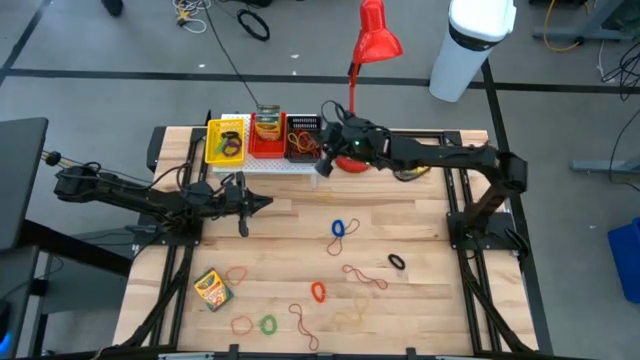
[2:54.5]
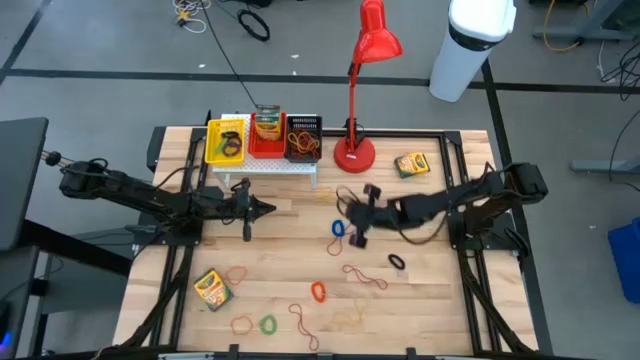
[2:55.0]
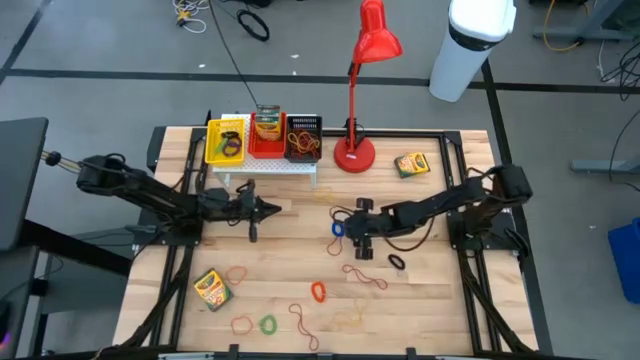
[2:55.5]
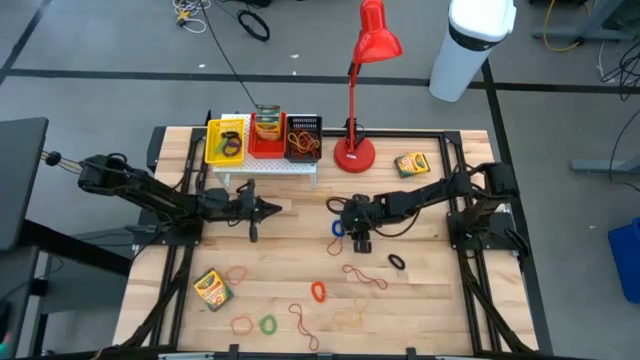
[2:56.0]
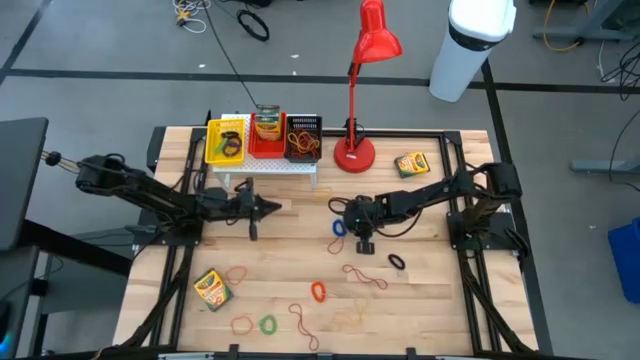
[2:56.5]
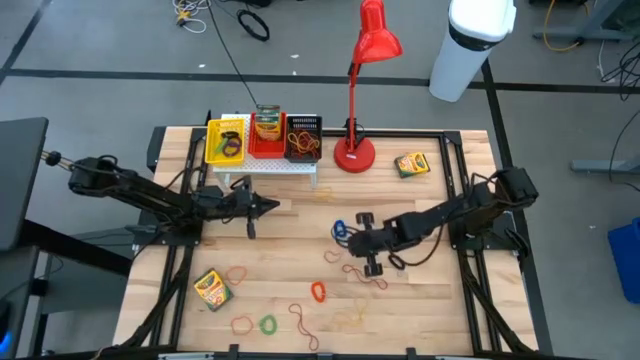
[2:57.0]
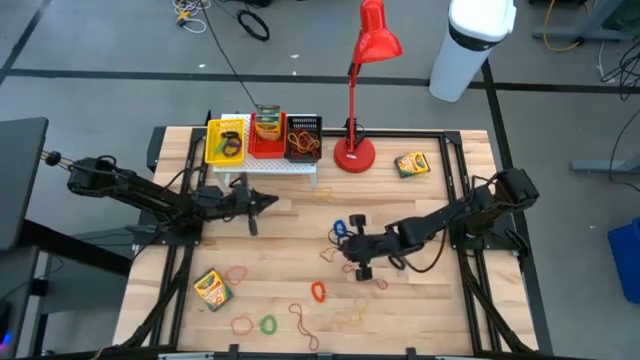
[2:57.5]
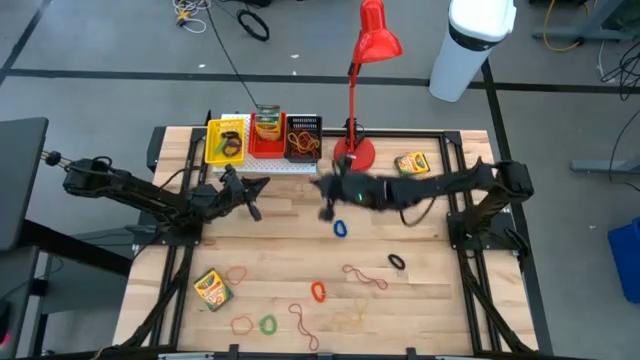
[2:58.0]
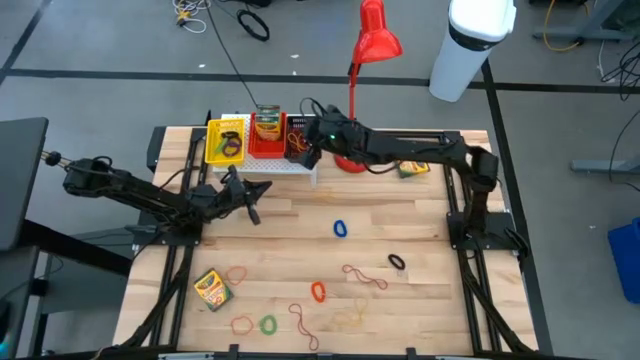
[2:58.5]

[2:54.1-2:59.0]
Task: Pick & Place Office Desk Supplies
Put the red rubber band into the black bin on the shelf

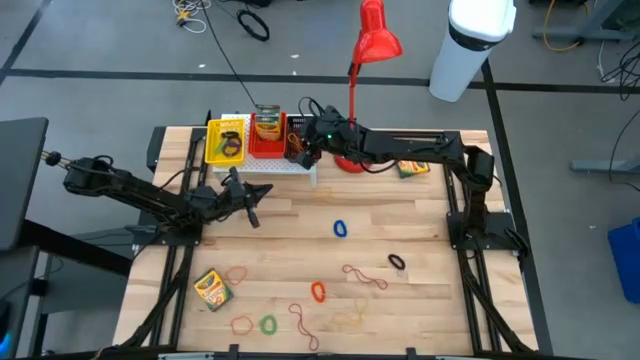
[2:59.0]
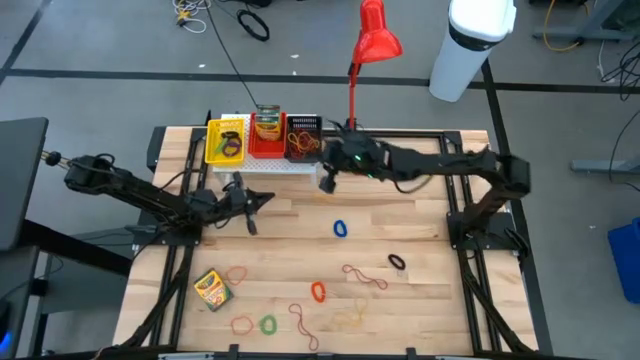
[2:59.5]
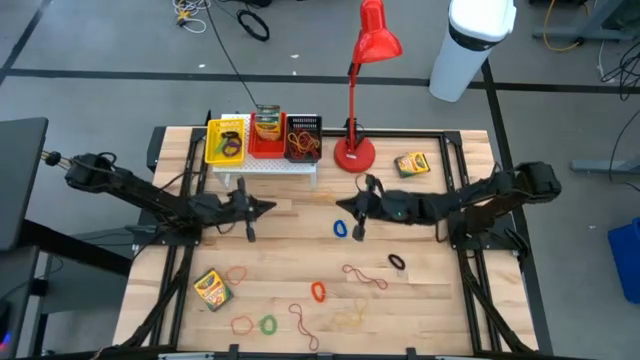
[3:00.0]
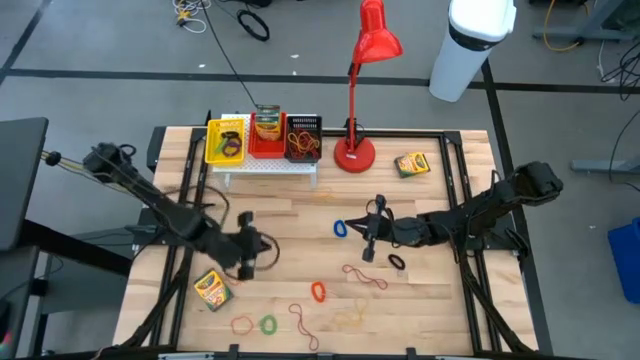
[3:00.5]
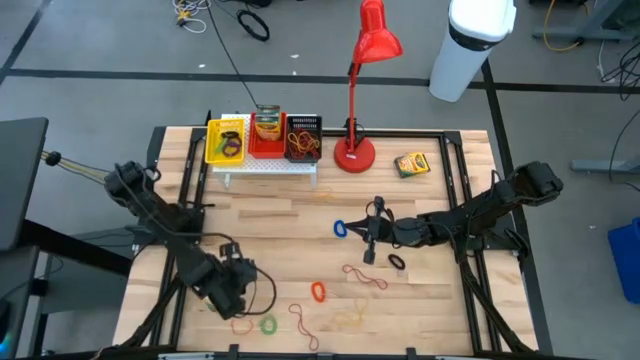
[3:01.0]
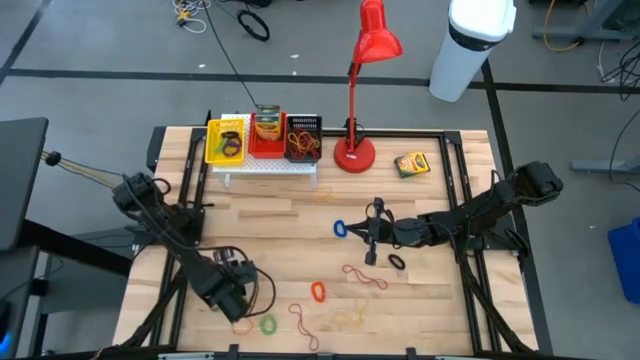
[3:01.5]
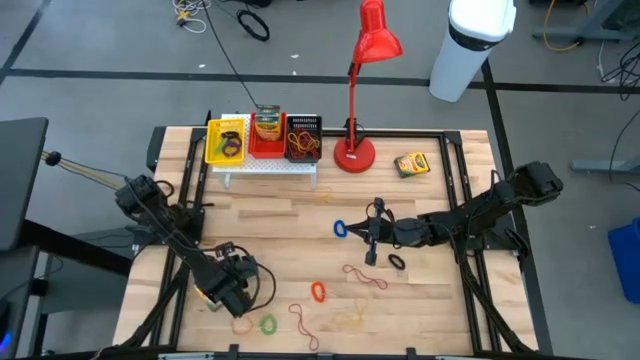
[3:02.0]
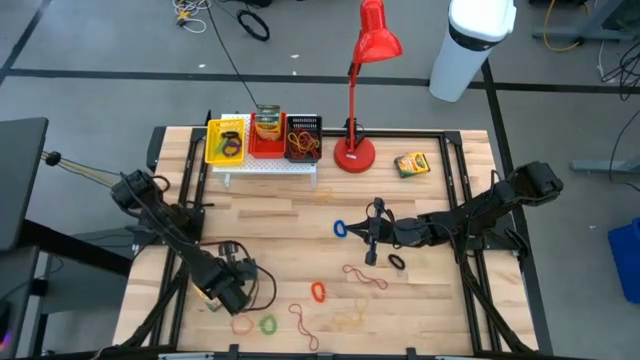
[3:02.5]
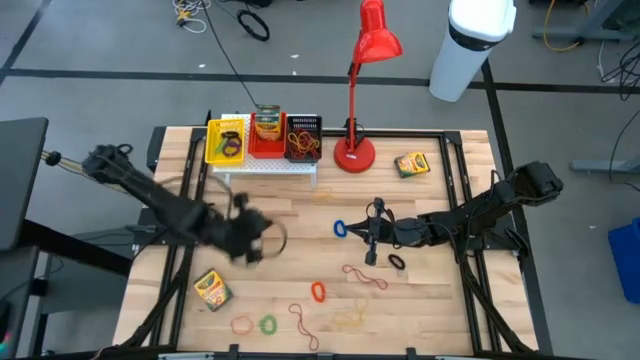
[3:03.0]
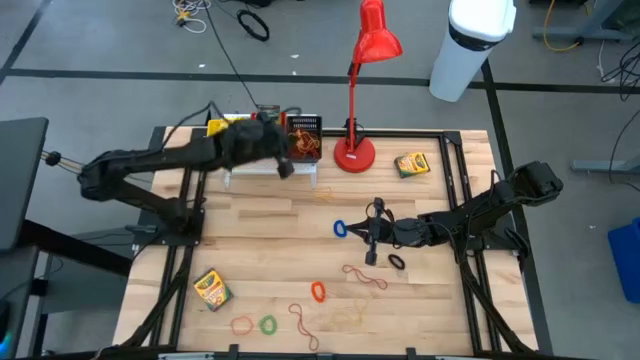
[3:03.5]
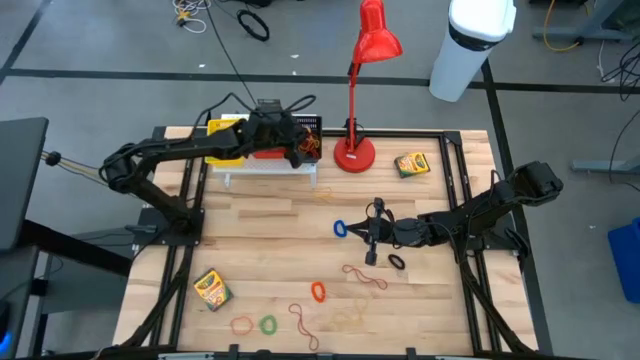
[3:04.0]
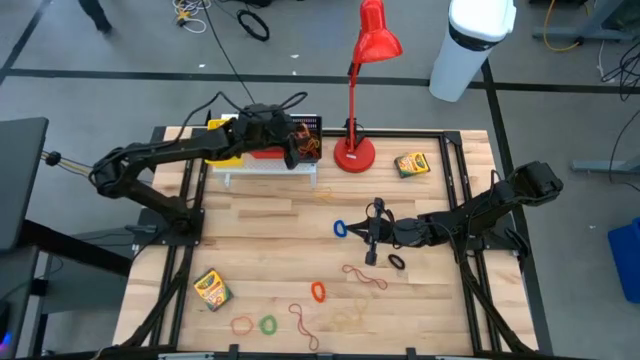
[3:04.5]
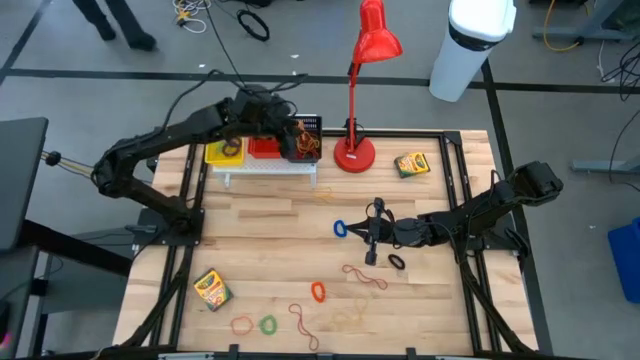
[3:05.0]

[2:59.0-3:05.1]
Put the orange rubber band into the black bin on the shelf

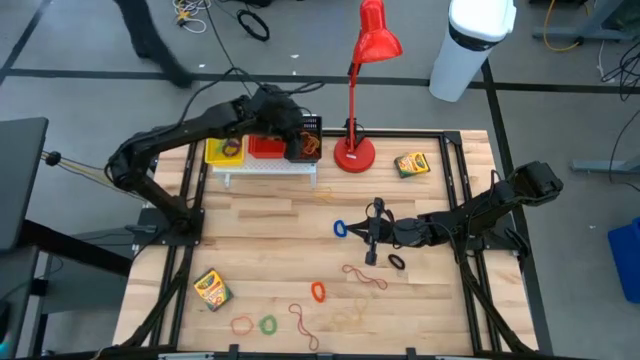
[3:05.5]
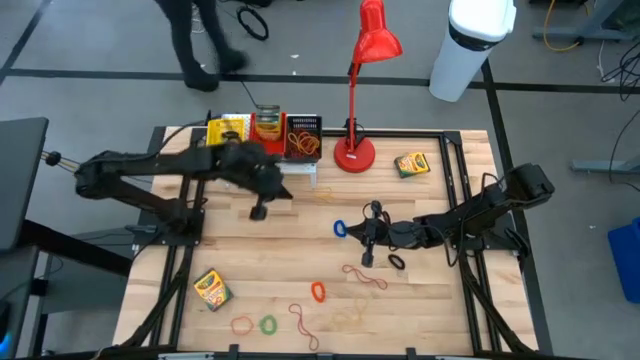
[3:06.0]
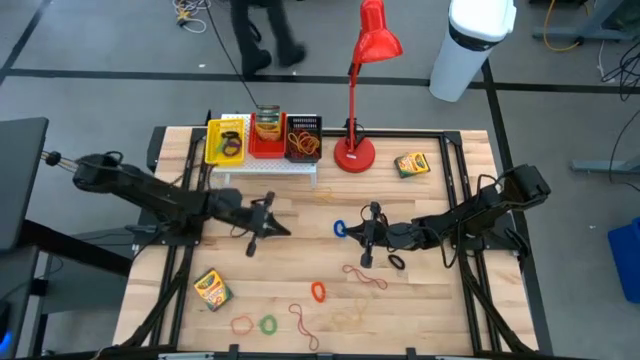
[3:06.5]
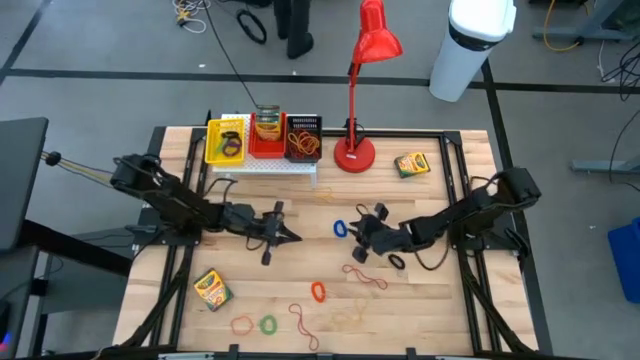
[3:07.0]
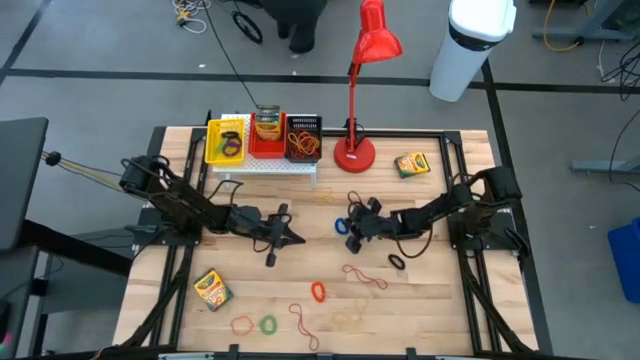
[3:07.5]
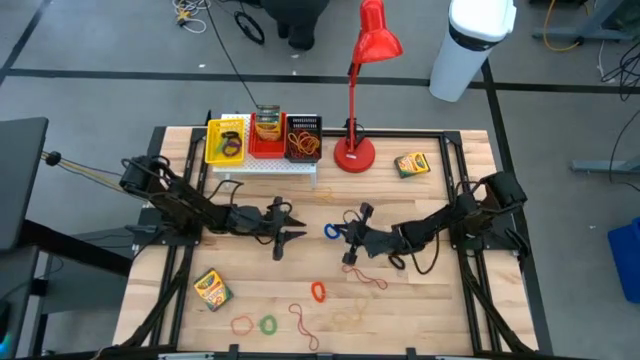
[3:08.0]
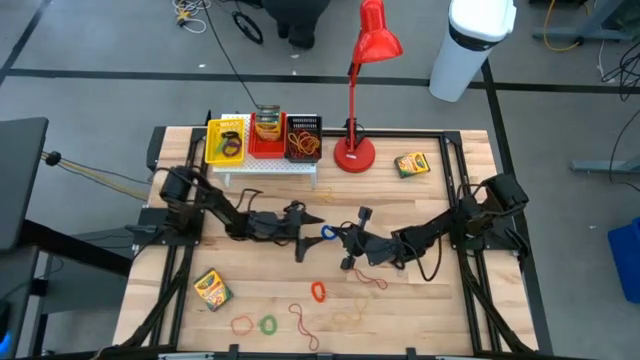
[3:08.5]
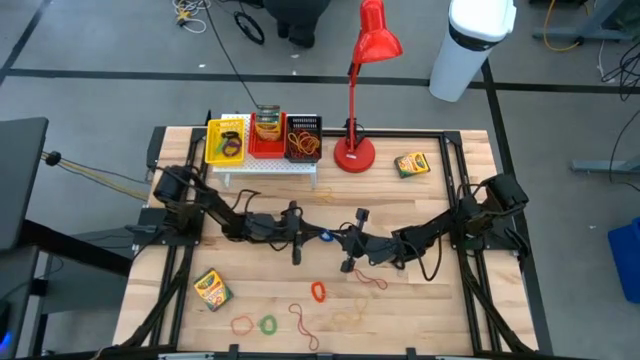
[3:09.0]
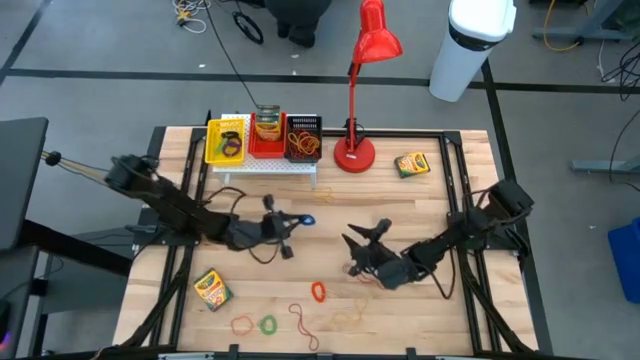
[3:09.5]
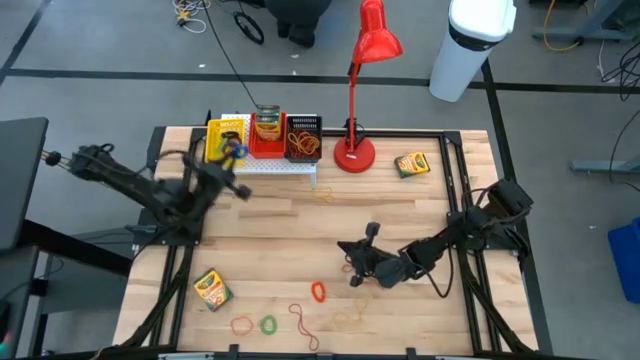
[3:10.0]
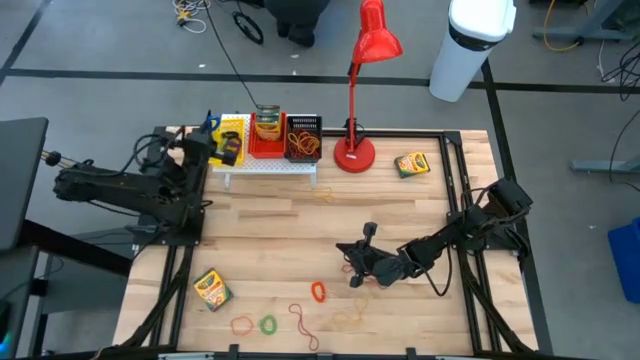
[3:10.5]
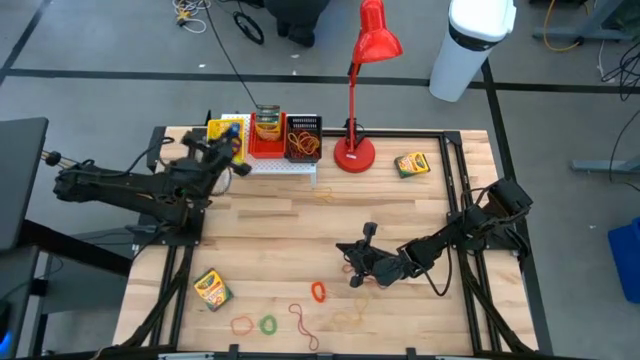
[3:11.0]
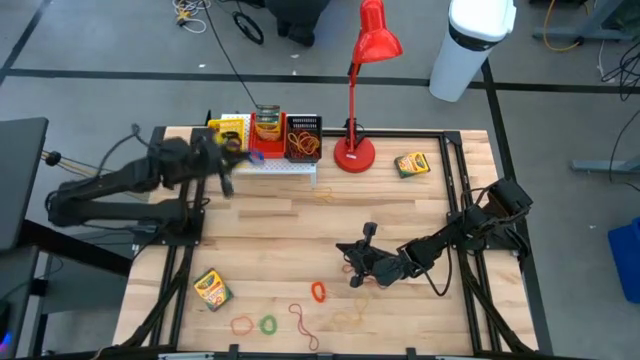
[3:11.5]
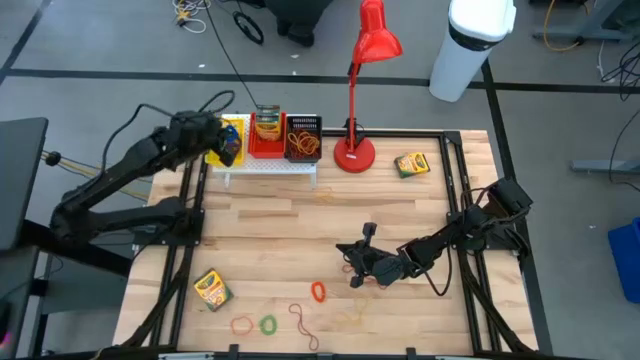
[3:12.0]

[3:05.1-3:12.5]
Put the blue spring rubber band into the yellow bin on the shelf

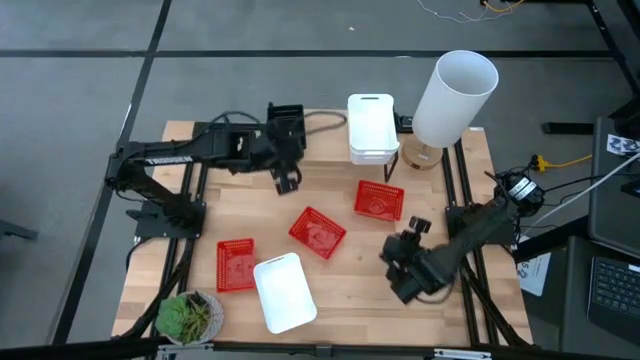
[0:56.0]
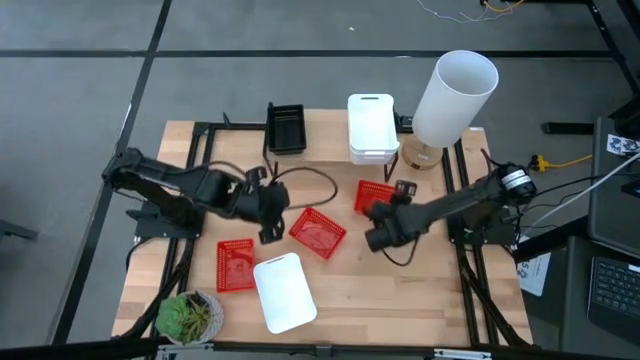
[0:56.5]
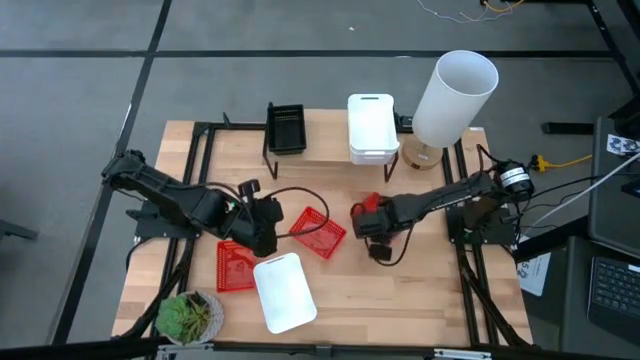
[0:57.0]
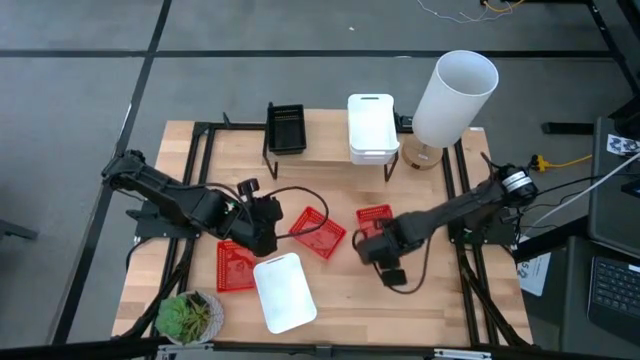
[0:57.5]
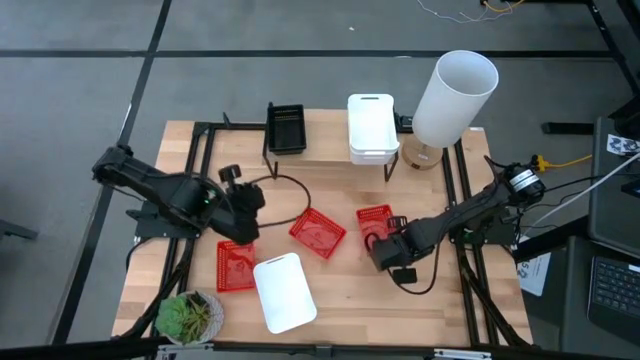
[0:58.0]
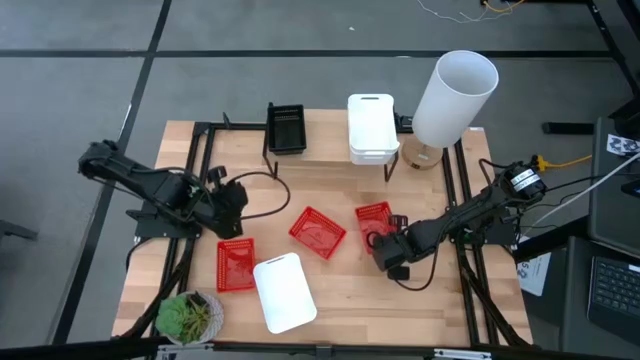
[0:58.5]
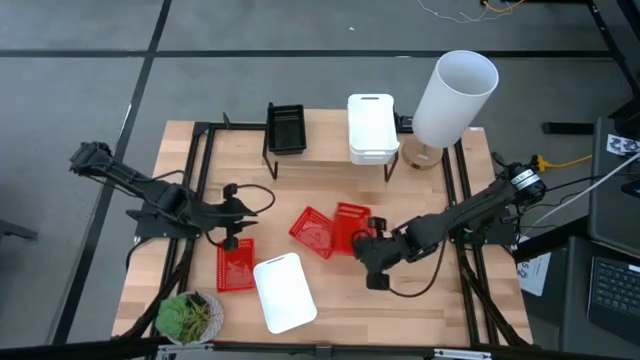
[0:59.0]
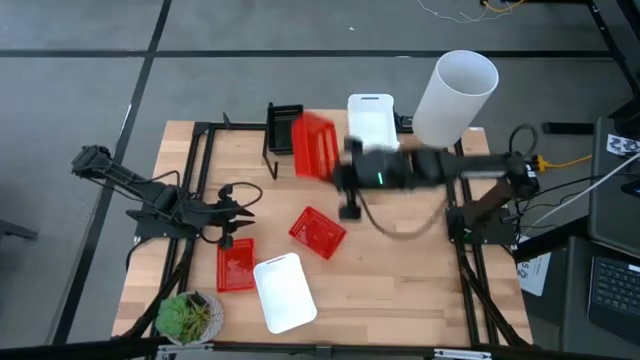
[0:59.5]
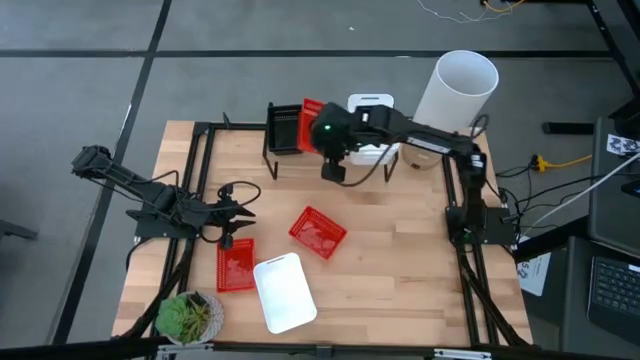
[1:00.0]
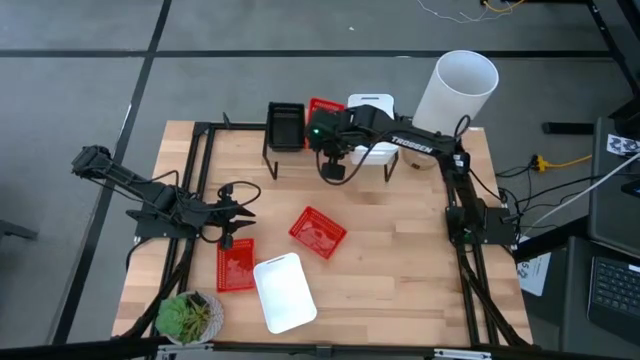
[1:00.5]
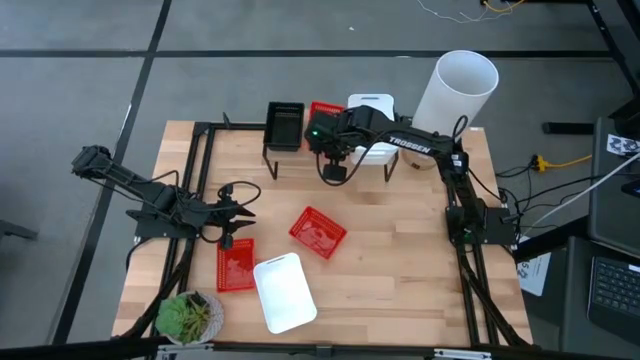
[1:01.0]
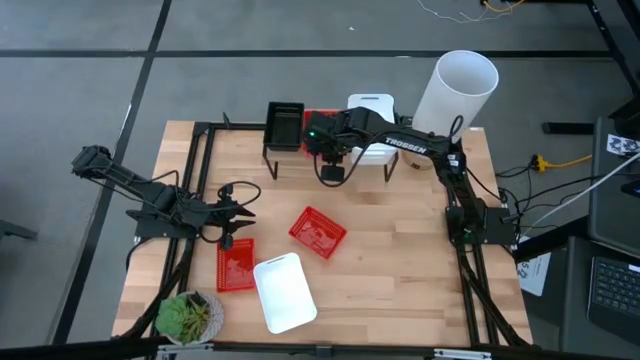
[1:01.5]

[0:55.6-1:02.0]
Task: Stack baskets on shelf by color
Put the right red bin on the shelf
